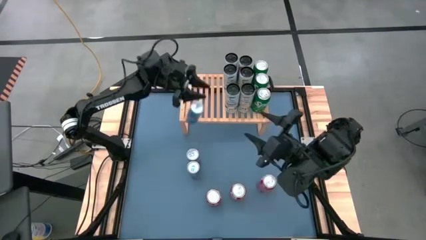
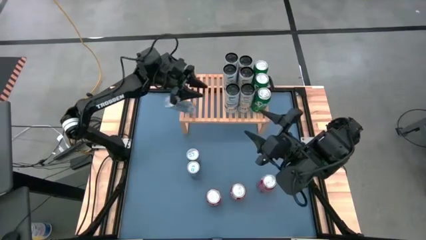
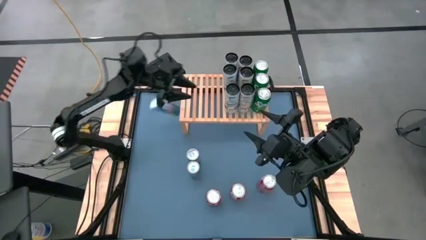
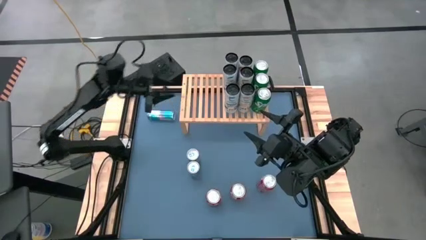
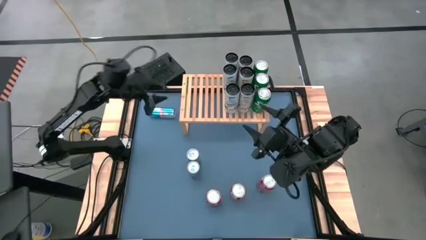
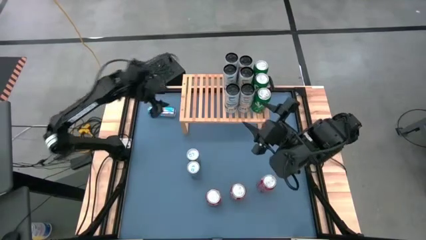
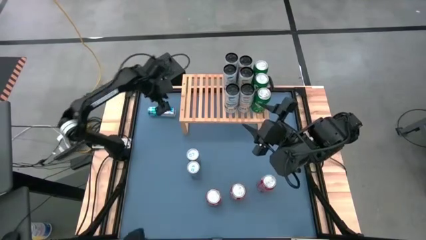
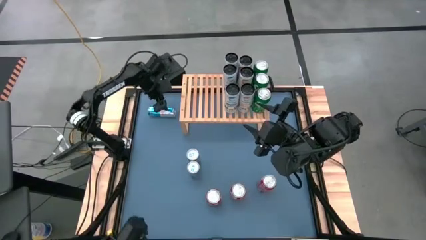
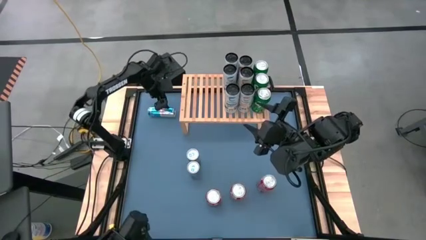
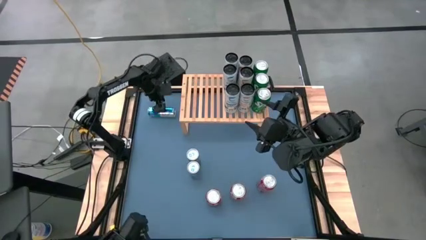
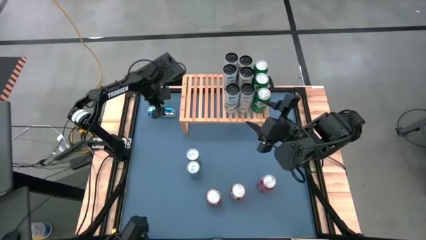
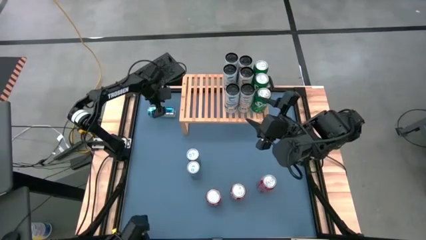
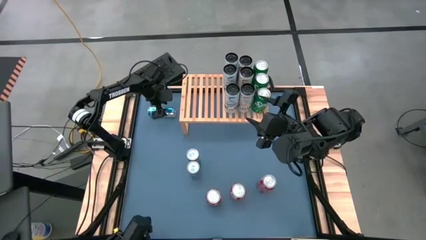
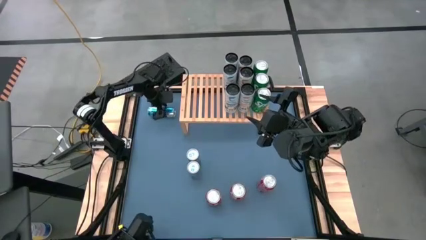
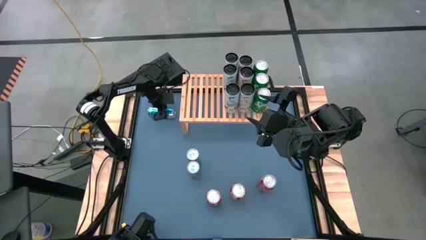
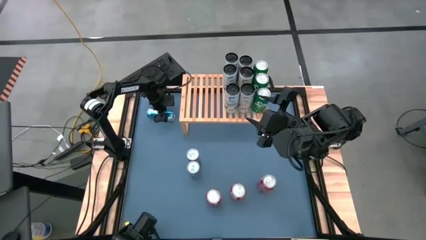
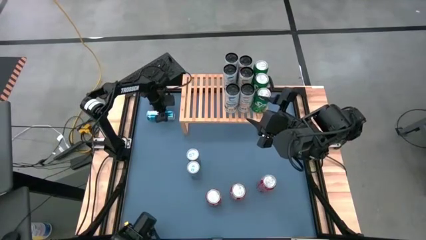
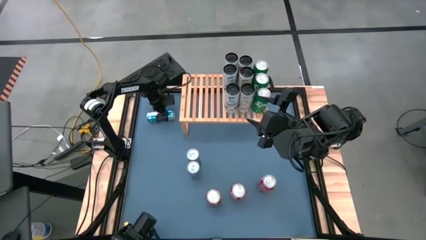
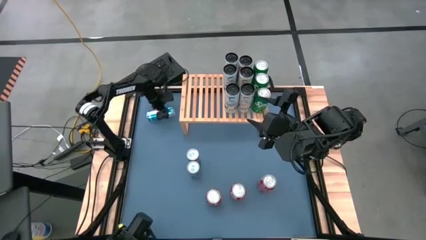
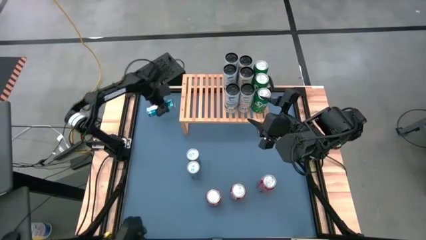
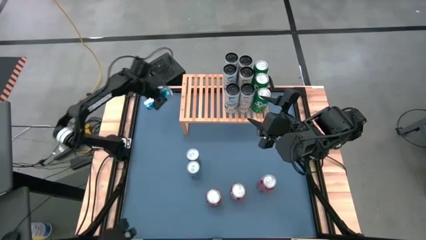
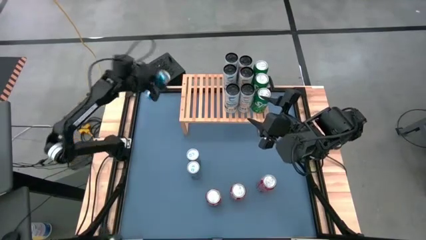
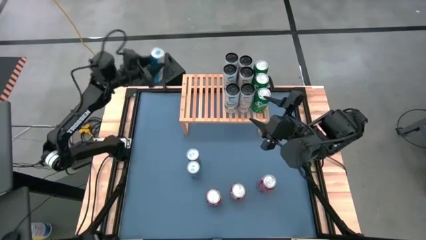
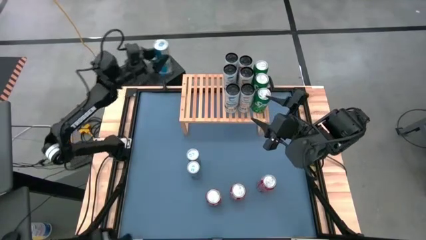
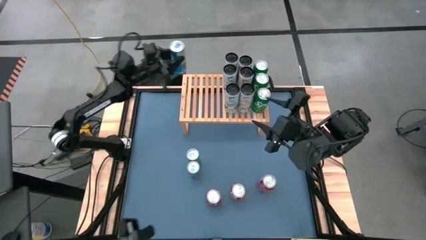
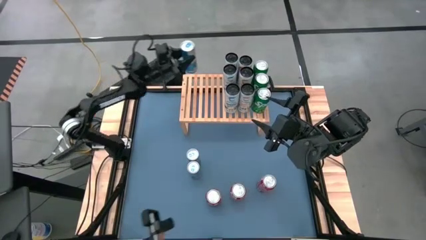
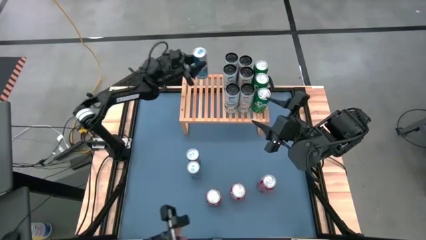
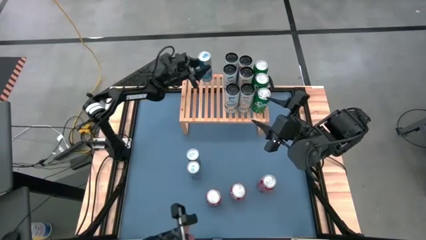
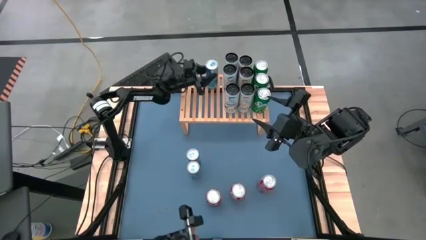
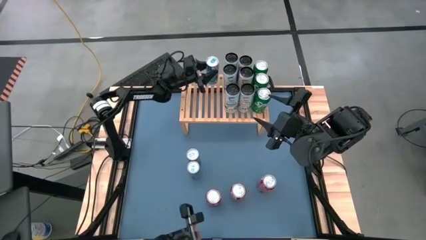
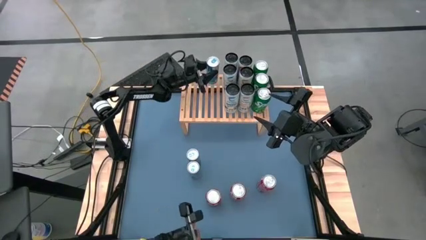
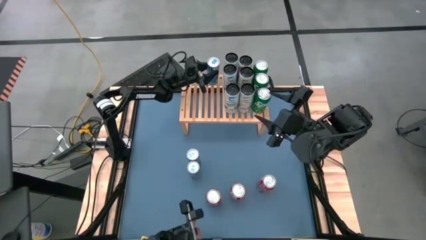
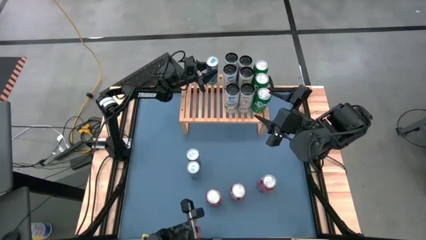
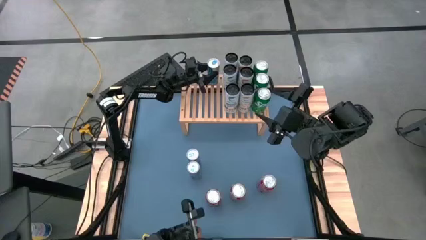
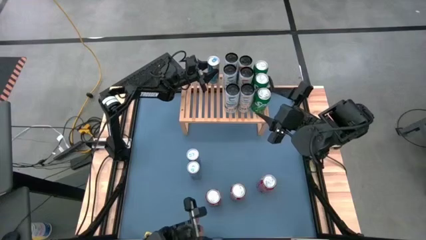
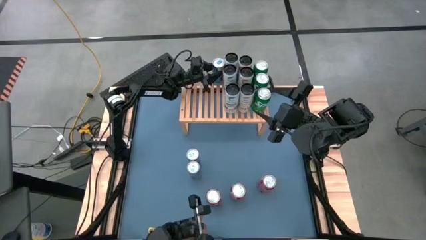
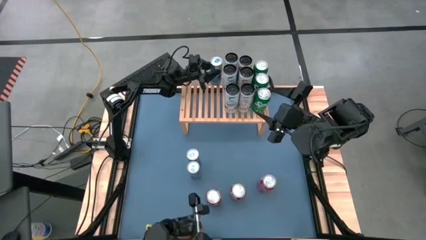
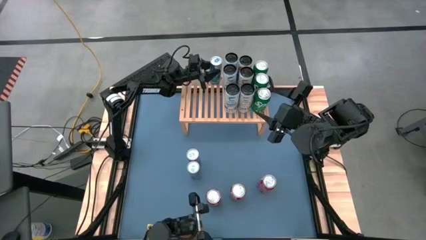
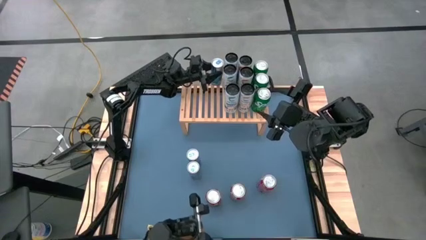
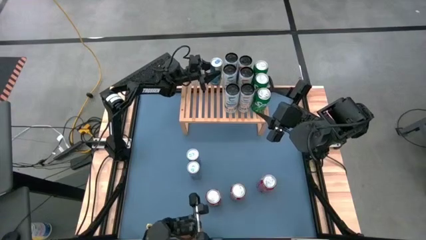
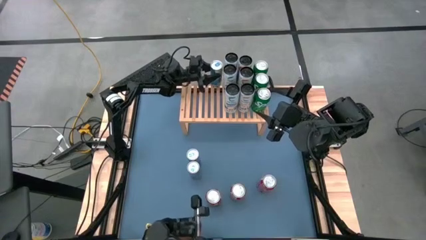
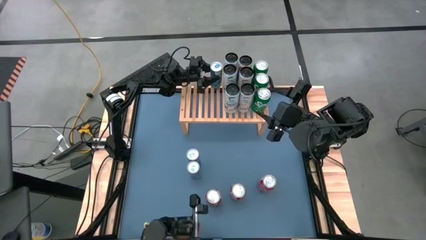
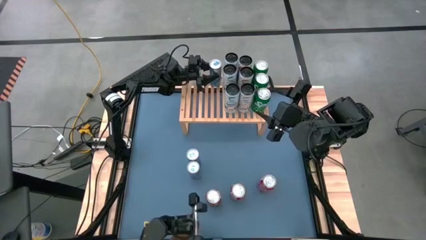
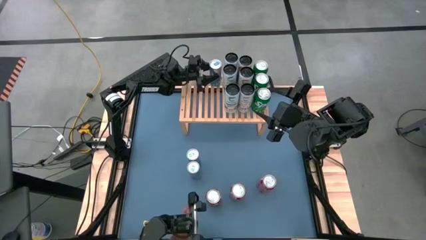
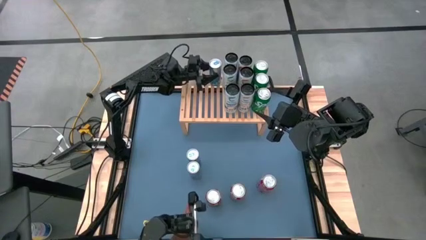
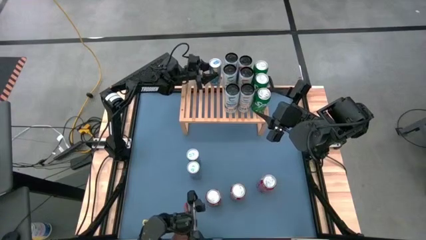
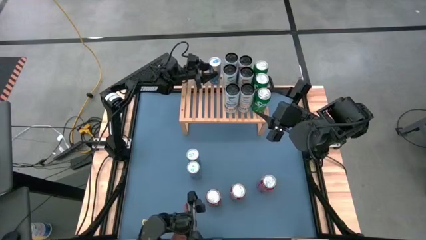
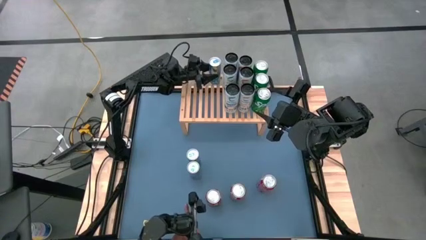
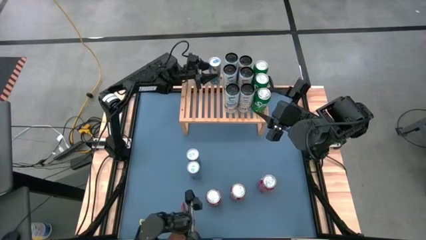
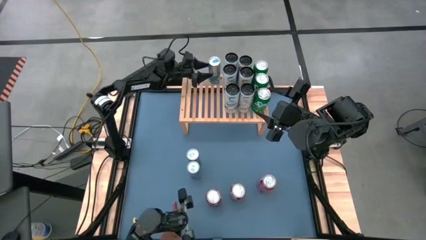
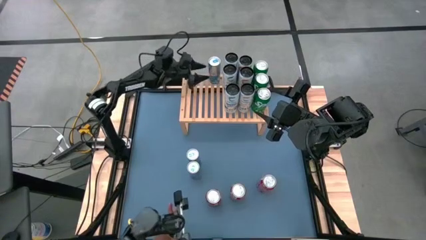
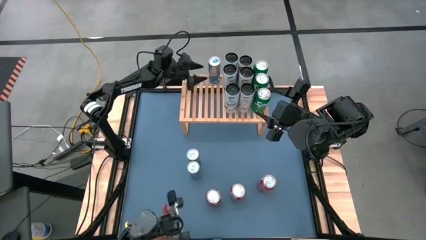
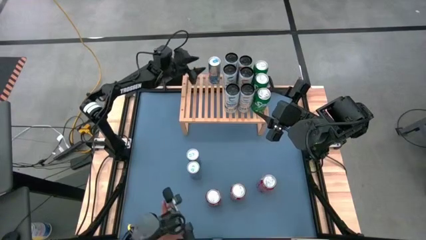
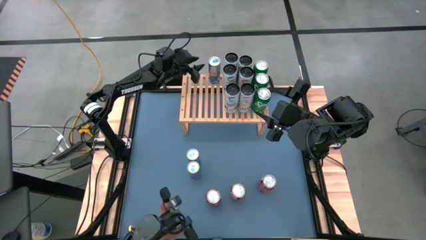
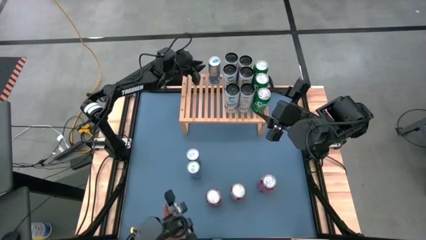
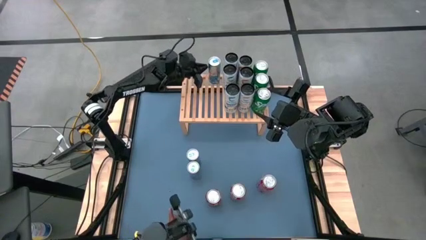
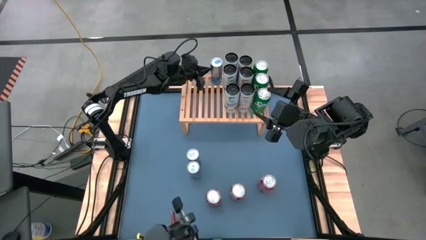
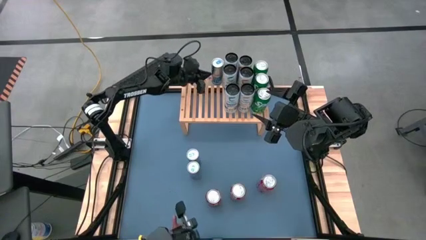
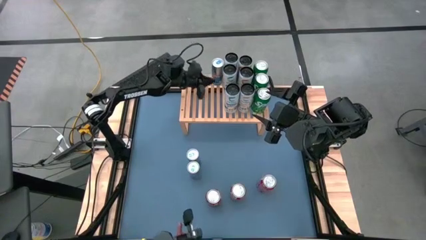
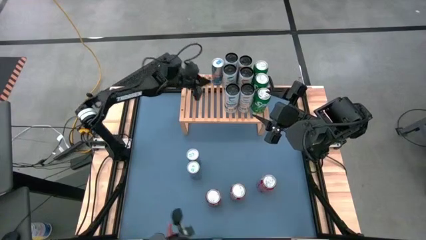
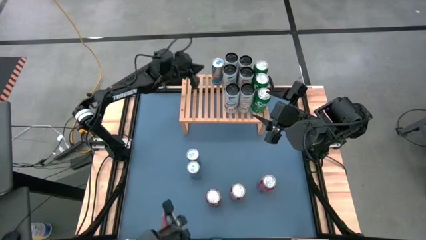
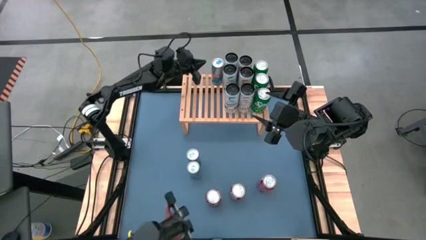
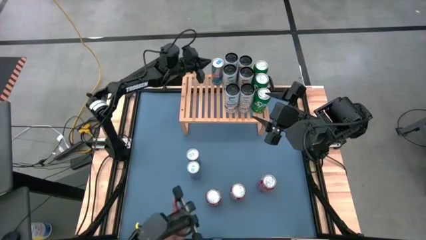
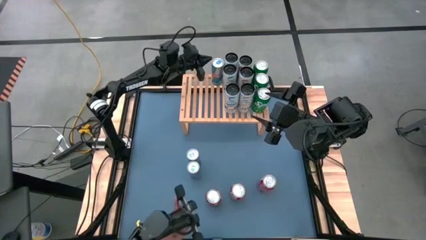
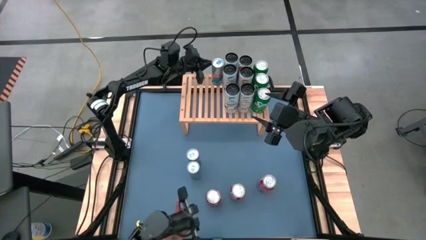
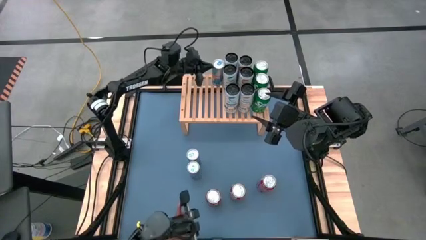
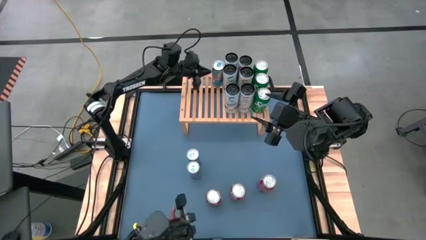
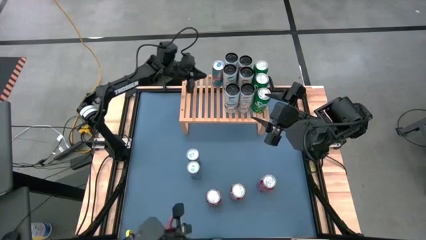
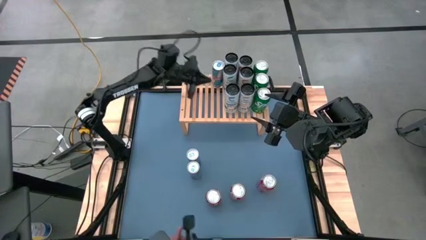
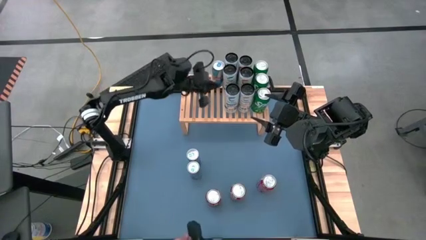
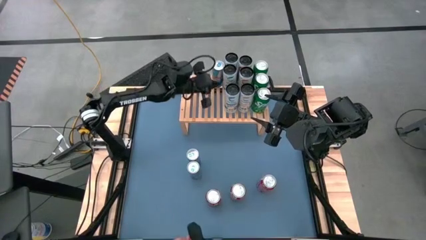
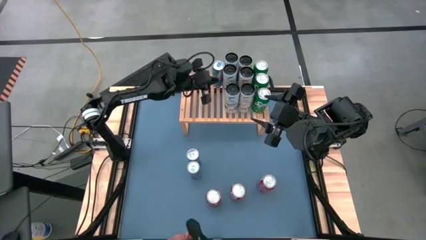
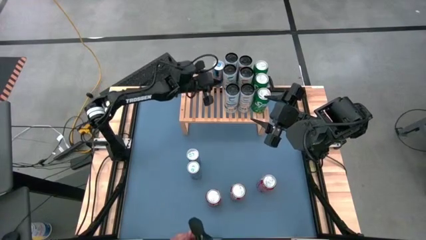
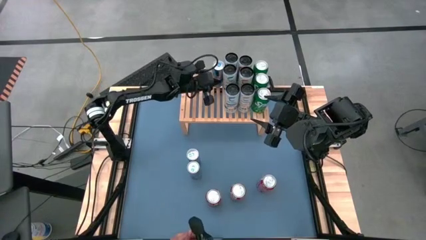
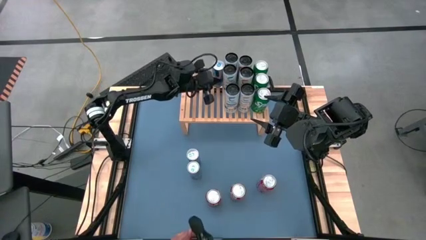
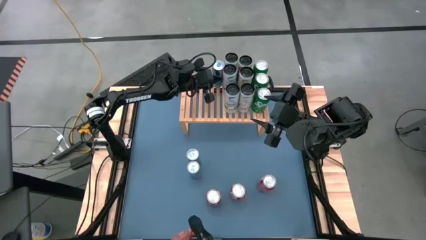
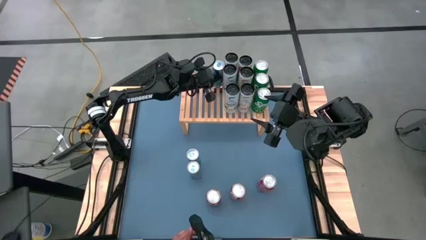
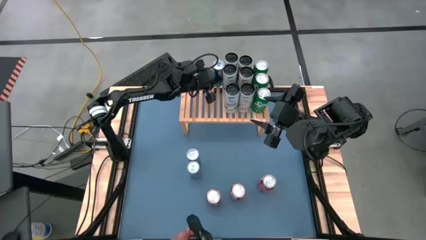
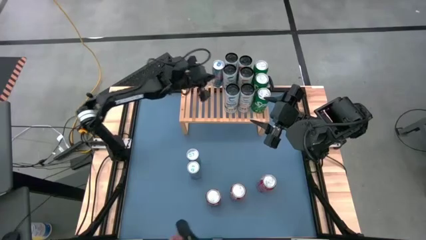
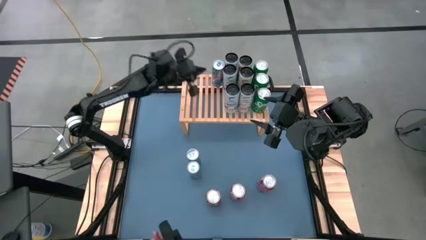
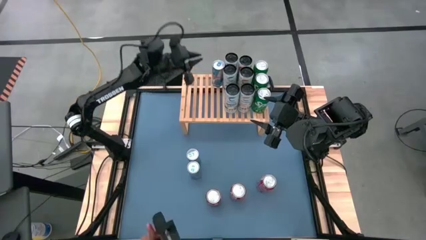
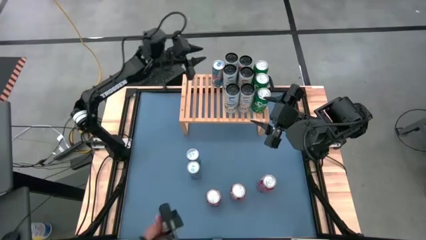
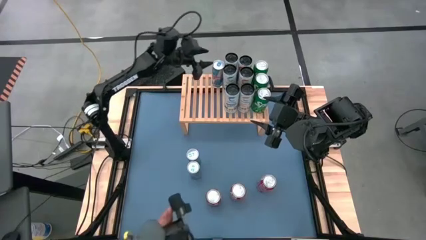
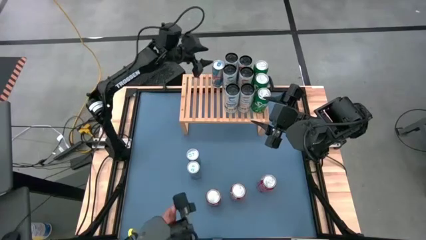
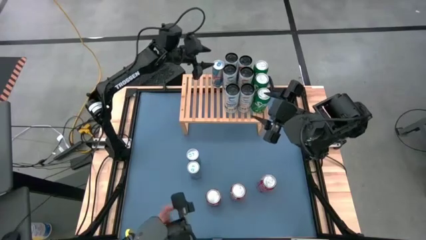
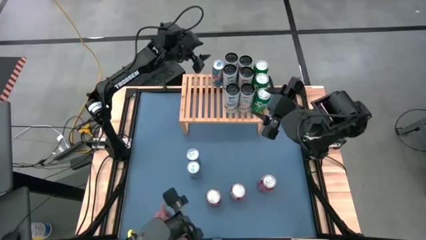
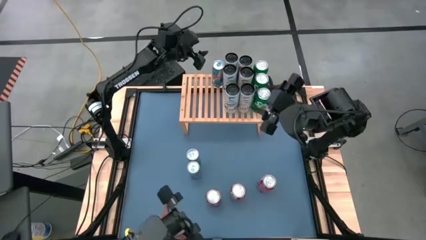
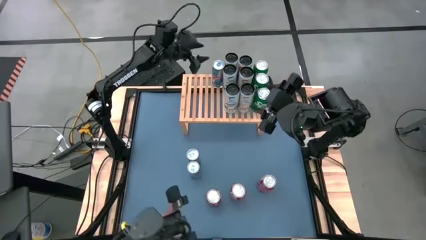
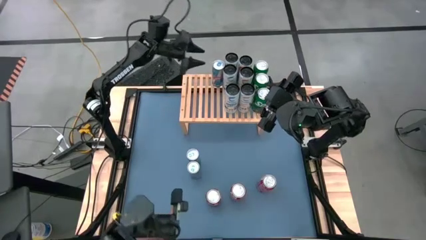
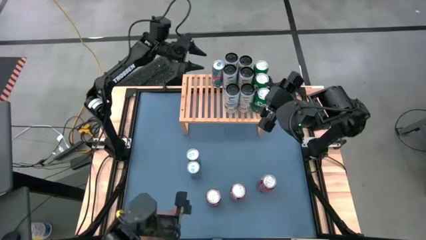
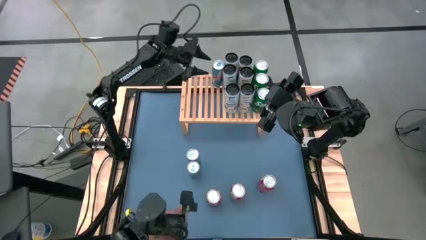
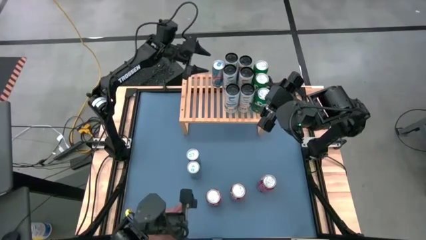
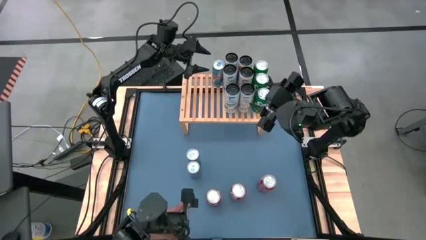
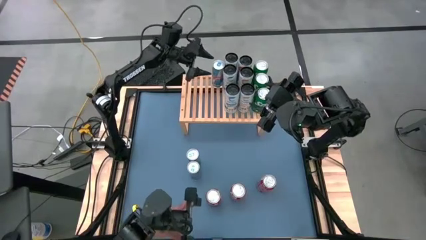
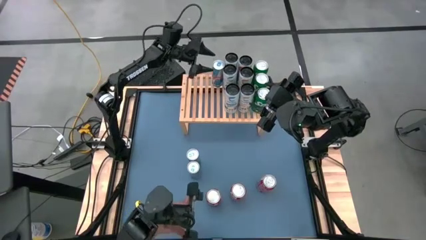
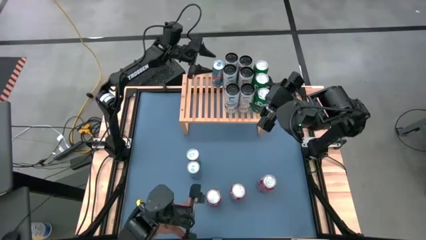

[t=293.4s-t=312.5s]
Task: Place canned beverage on shelf
Put the top left blue soda can on the shelf
